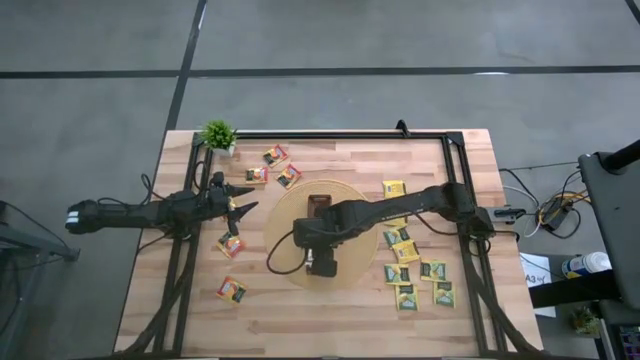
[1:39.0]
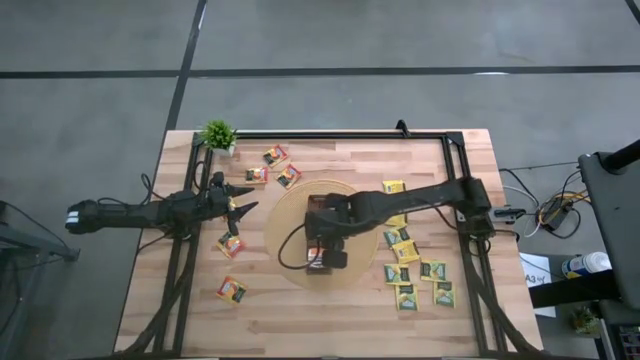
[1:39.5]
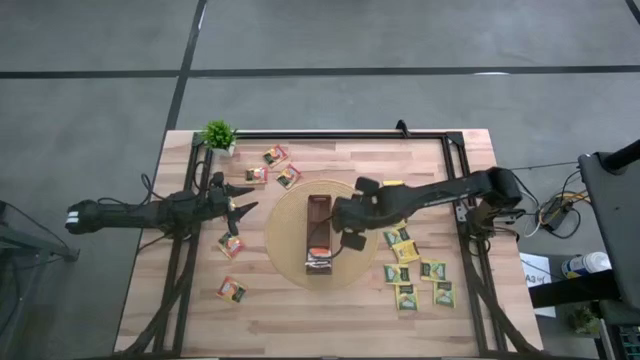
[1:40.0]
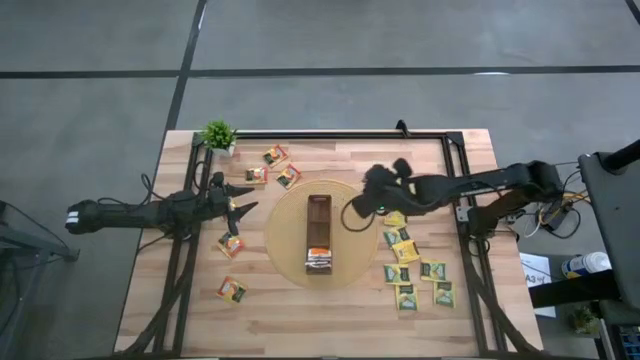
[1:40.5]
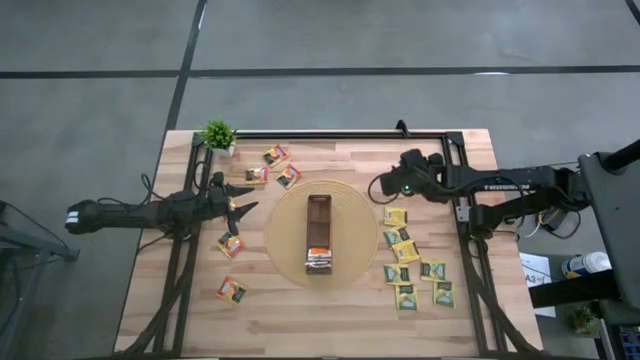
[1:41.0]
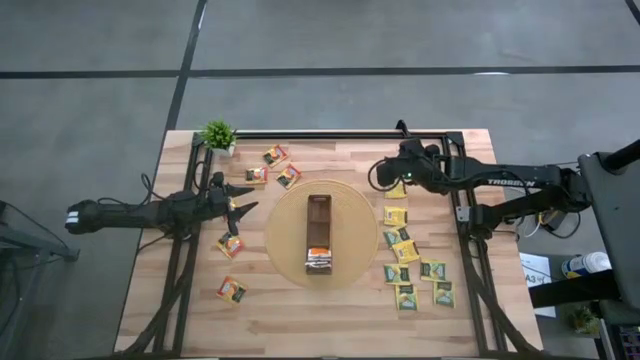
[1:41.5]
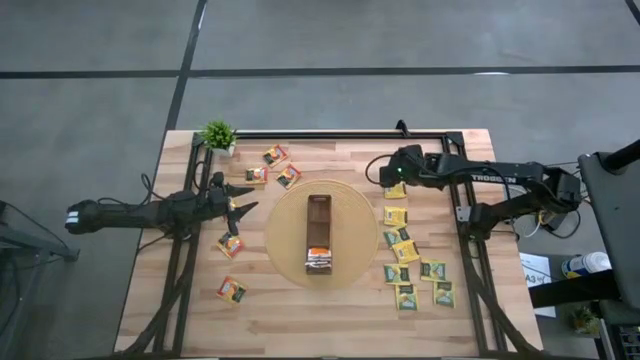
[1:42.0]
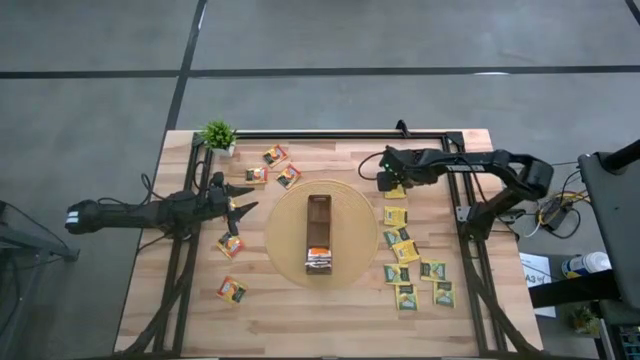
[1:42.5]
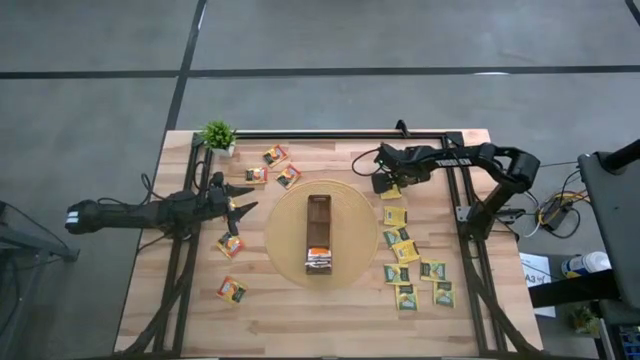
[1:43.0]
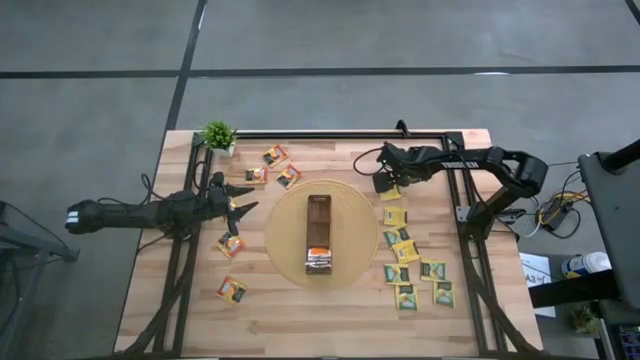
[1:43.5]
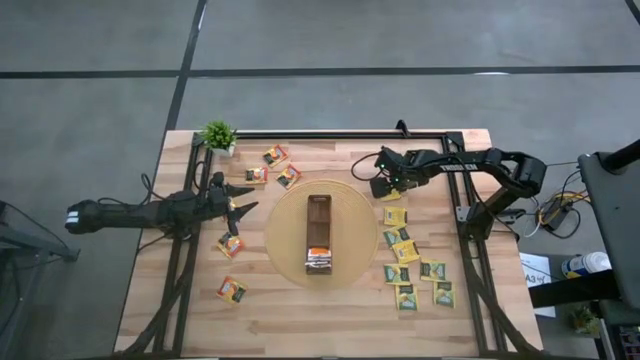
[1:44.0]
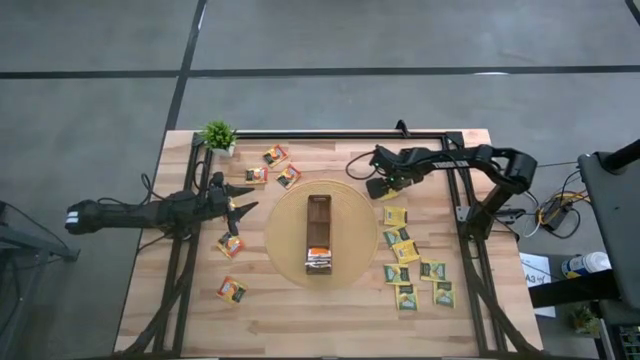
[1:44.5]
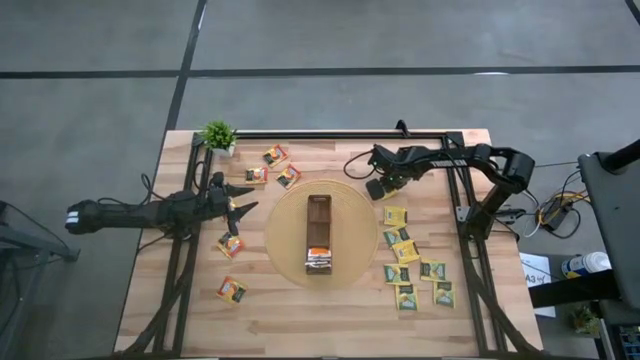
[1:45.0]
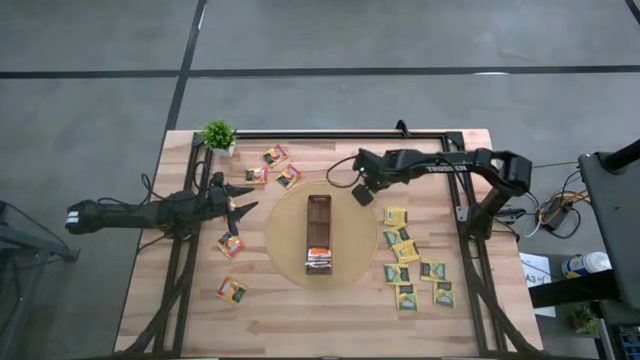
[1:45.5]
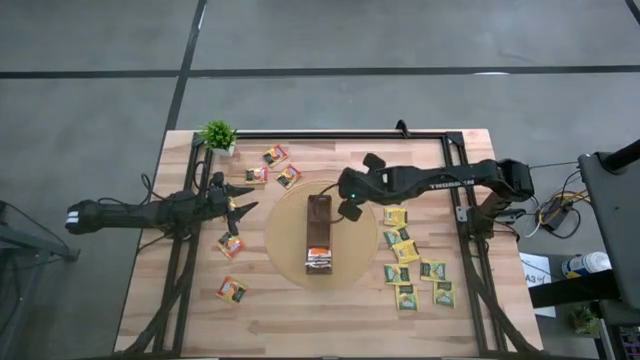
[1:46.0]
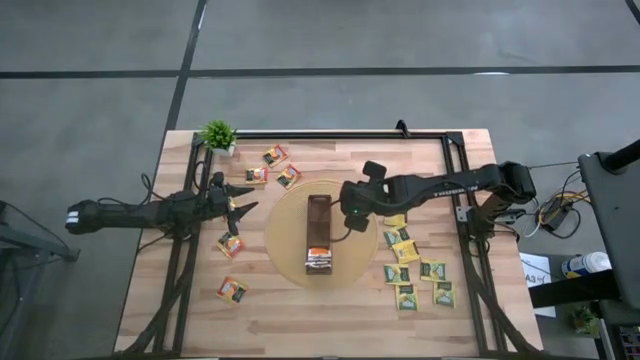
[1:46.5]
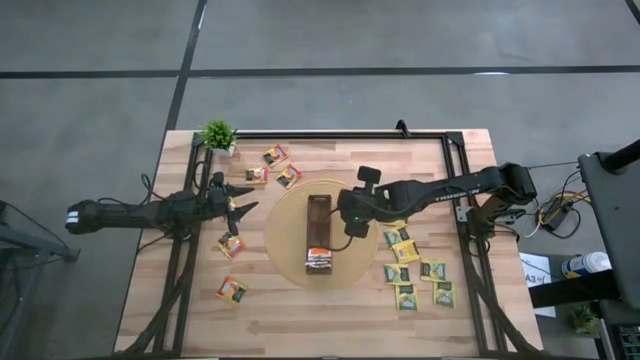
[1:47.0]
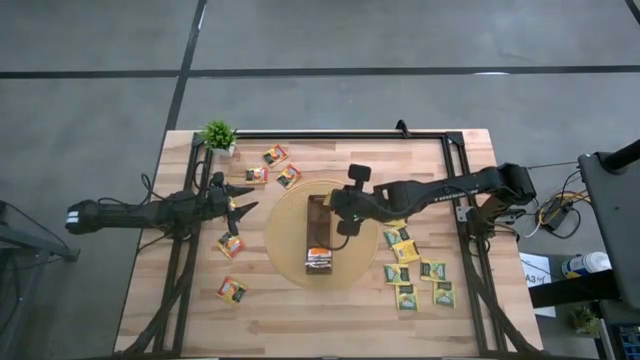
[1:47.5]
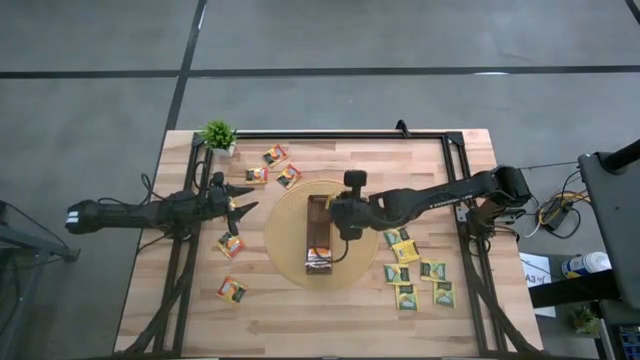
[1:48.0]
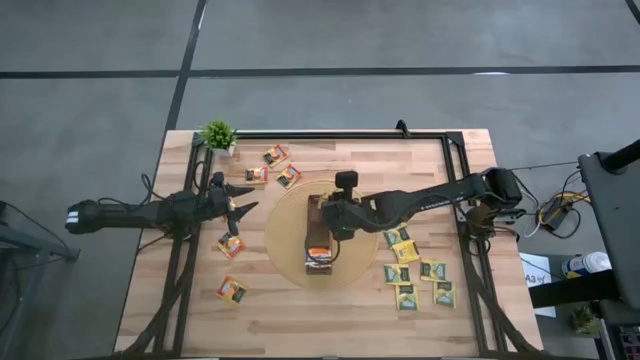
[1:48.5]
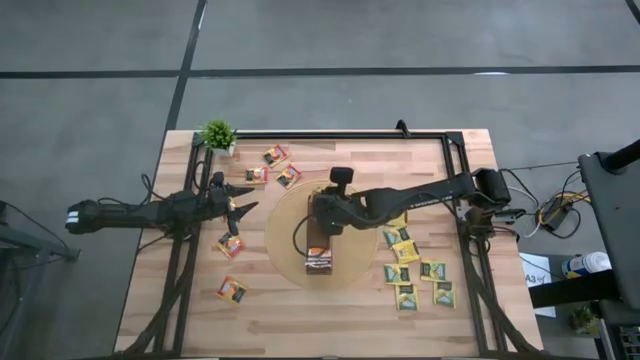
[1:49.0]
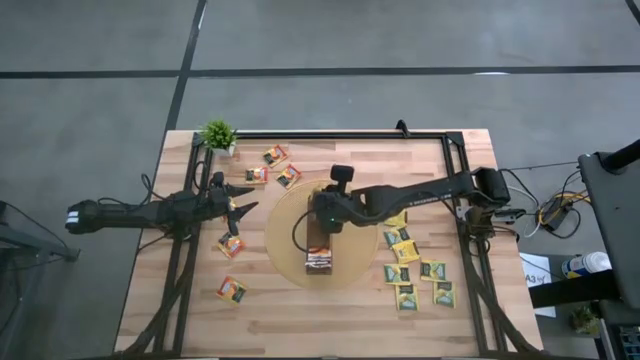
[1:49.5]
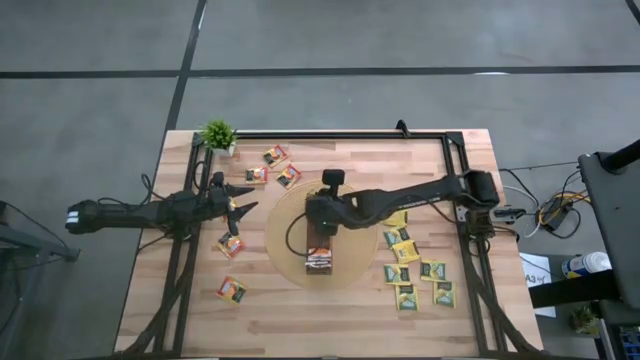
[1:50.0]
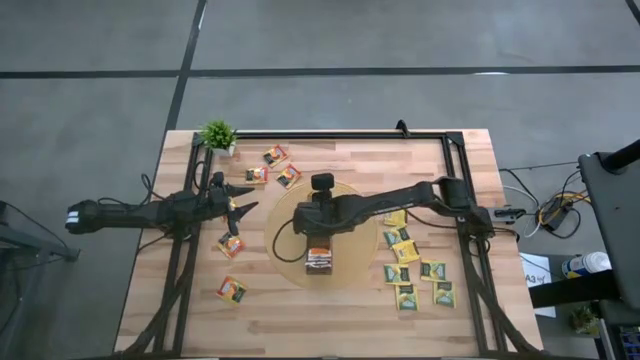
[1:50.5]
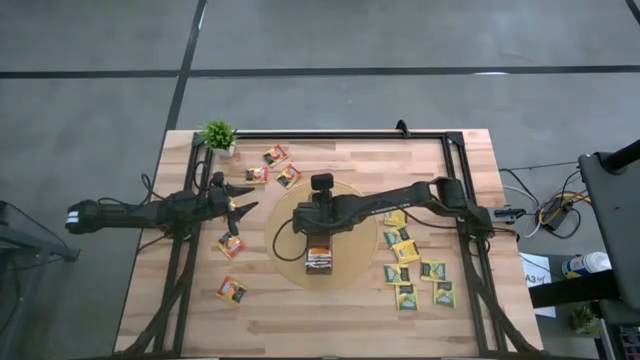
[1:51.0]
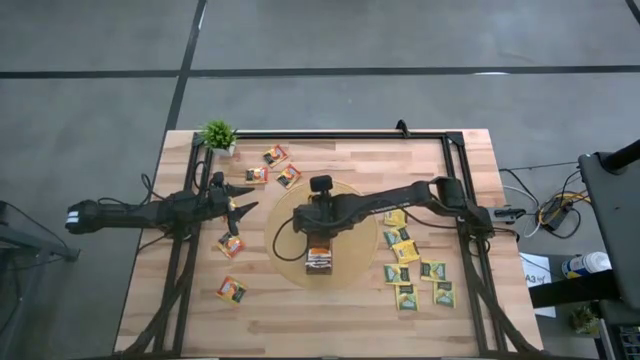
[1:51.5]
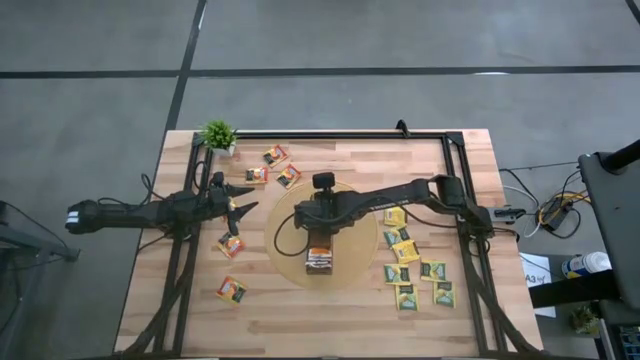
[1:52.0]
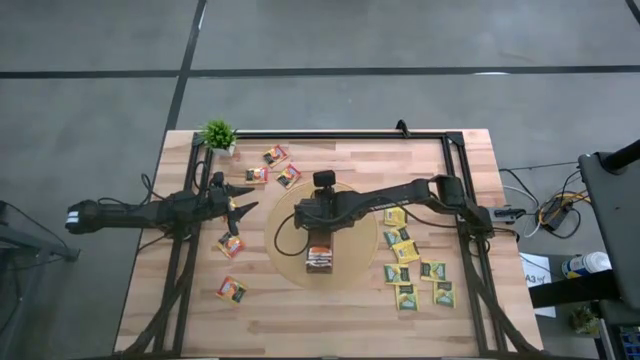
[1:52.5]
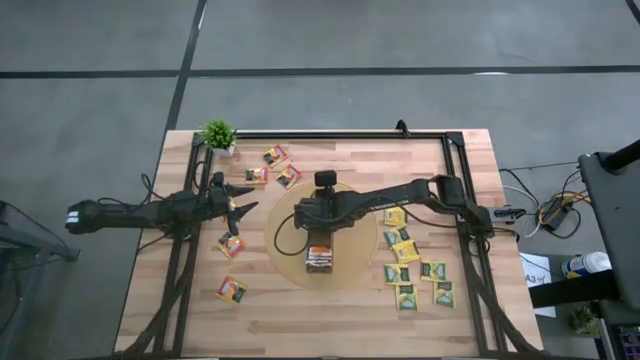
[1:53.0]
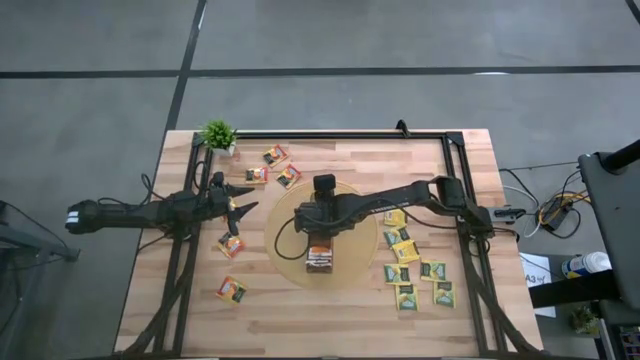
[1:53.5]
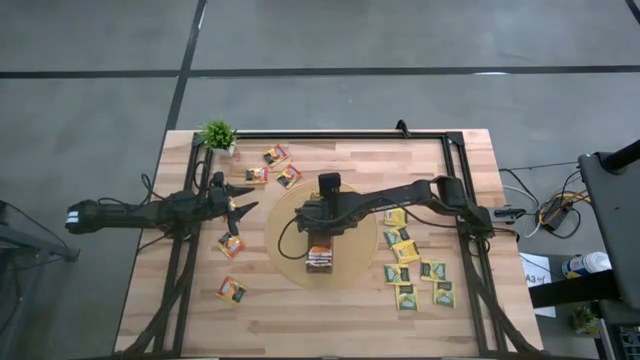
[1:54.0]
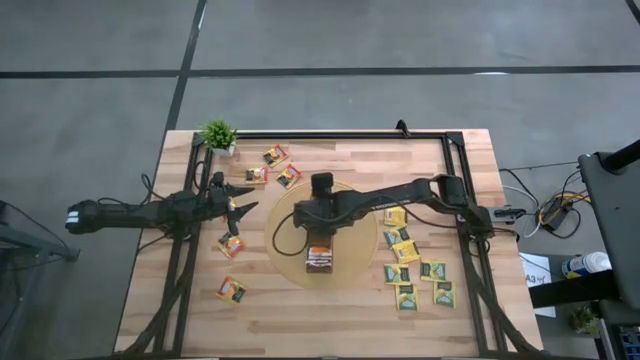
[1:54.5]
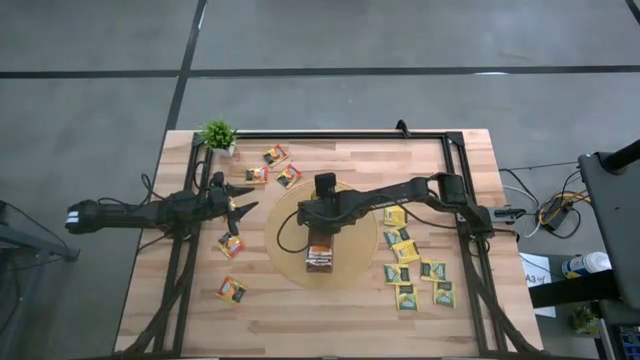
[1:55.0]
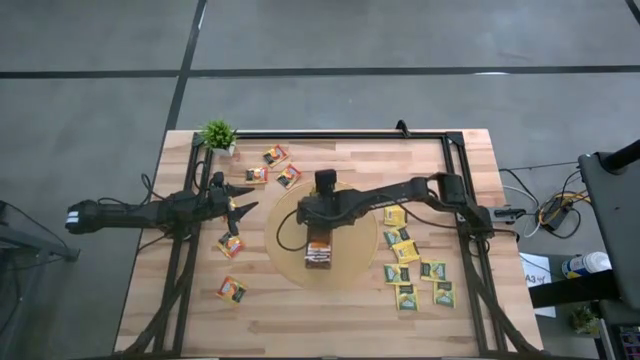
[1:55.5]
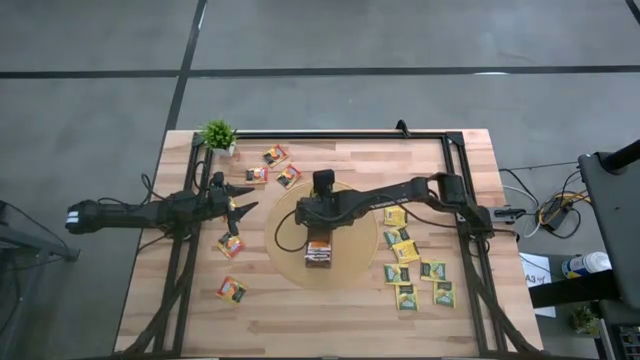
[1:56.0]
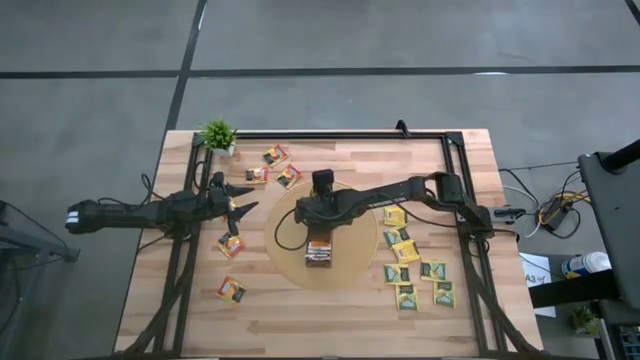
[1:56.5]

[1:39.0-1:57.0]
Task: Pick & Place Tea
Put the yellow tea bag into the top section of the wooden organizer

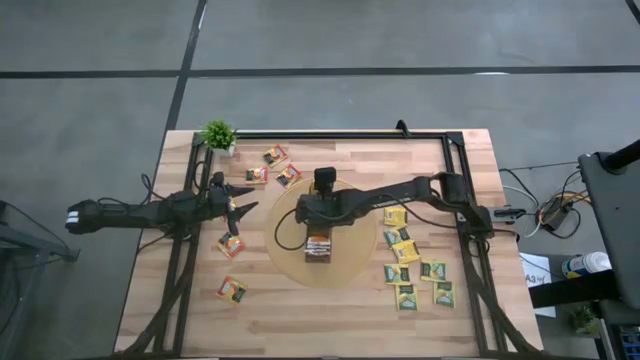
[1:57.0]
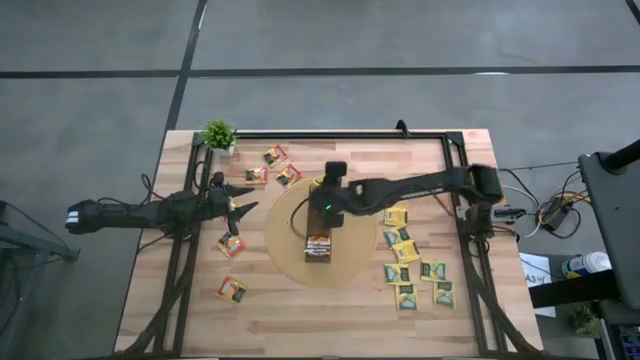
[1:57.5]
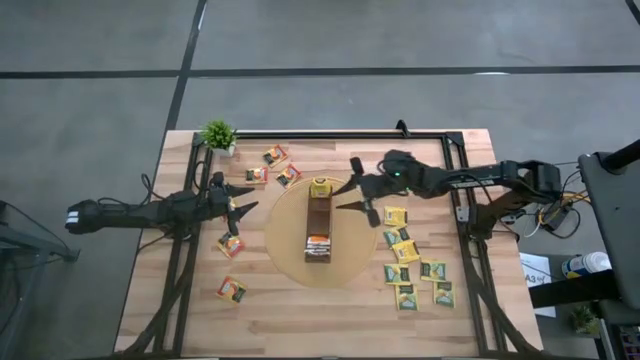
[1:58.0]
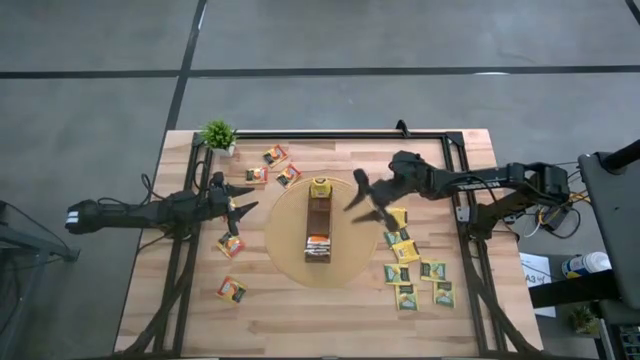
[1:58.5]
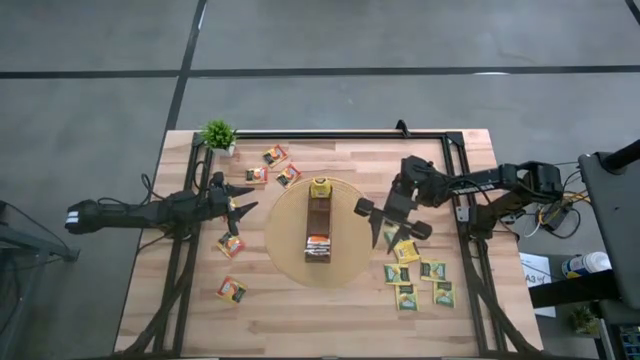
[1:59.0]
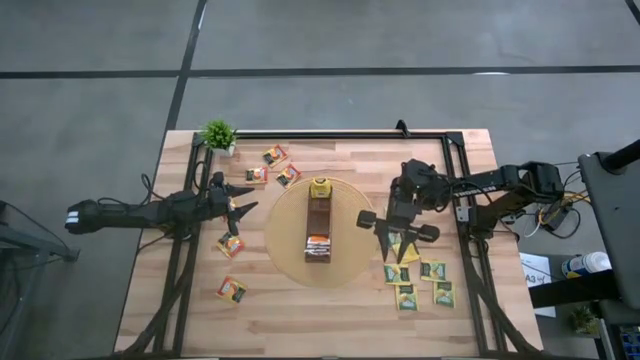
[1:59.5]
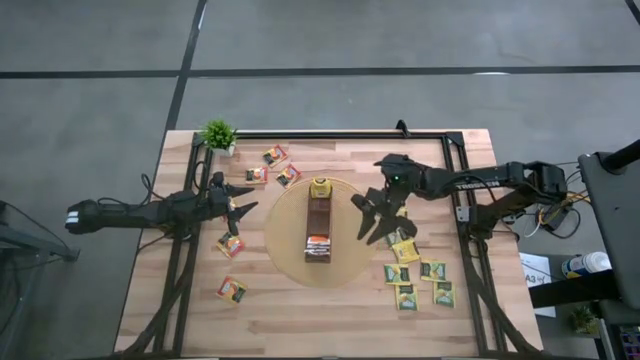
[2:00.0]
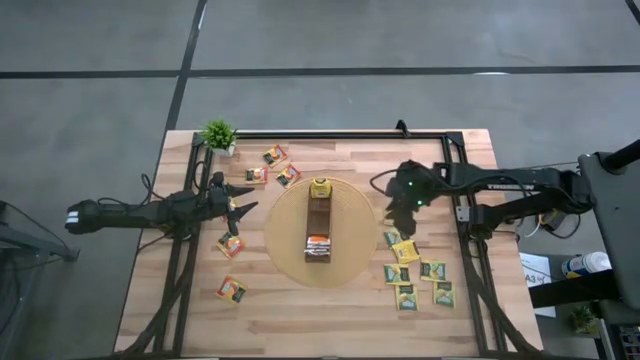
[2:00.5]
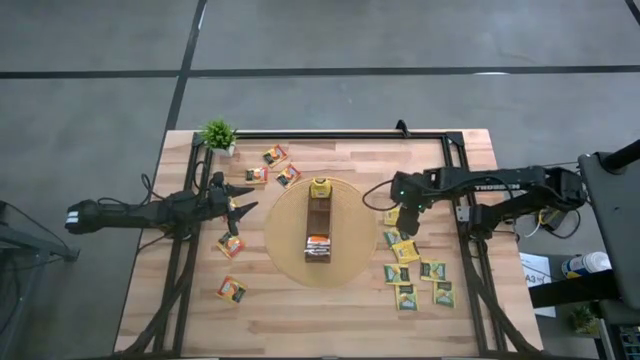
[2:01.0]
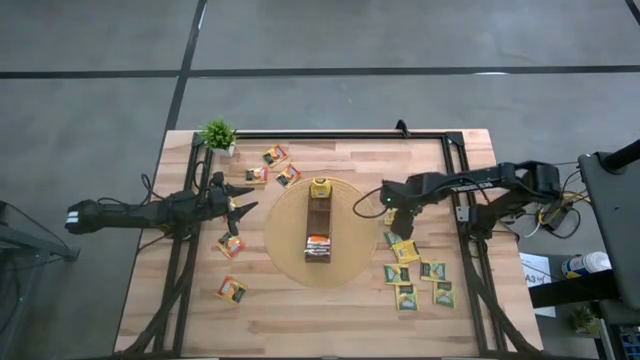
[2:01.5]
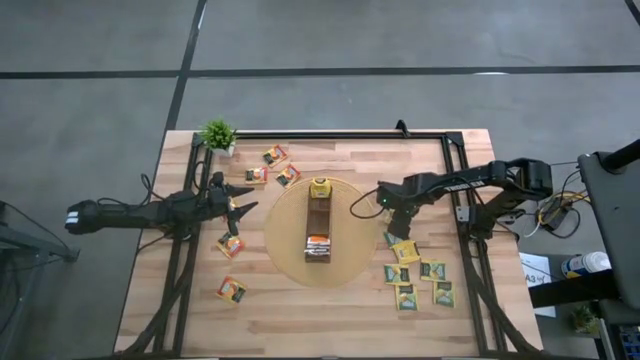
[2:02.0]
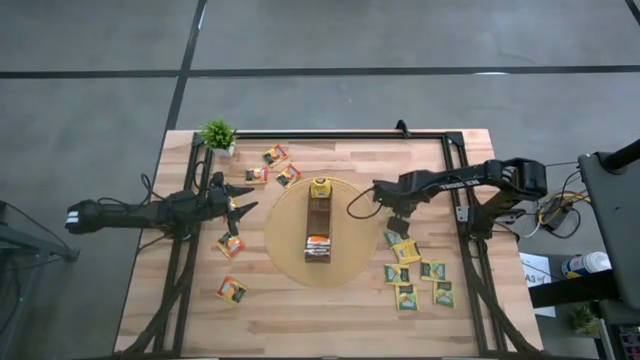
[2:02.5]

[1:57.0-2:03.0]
Put the yellow tea bag into the top section of the wooden organizer
